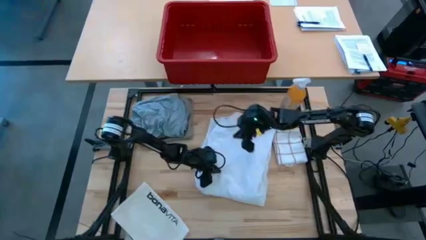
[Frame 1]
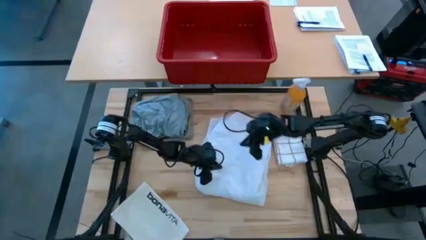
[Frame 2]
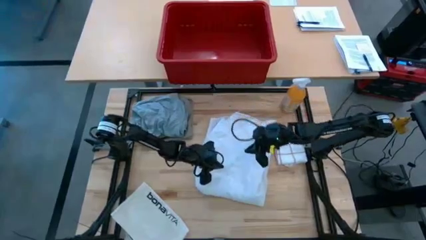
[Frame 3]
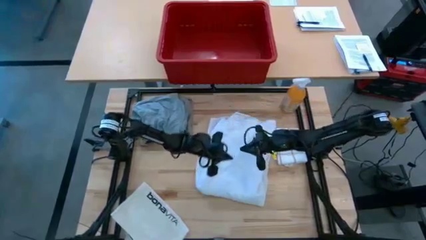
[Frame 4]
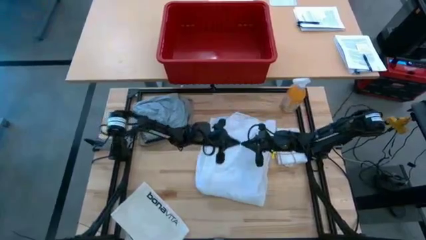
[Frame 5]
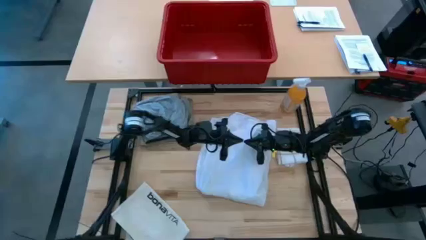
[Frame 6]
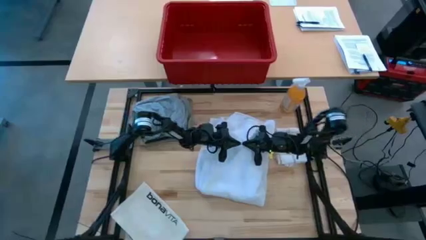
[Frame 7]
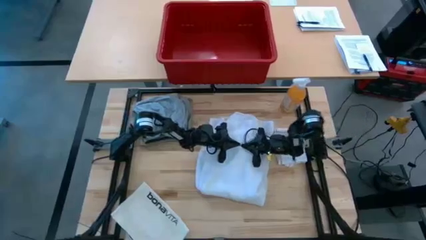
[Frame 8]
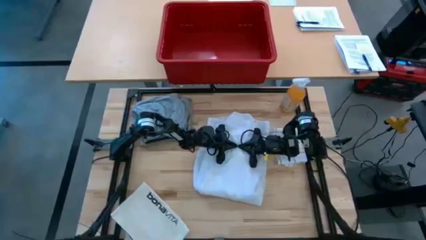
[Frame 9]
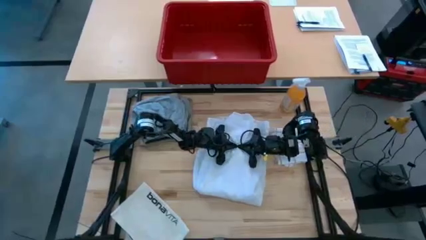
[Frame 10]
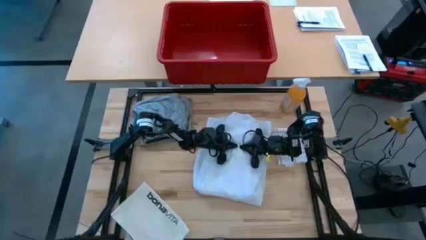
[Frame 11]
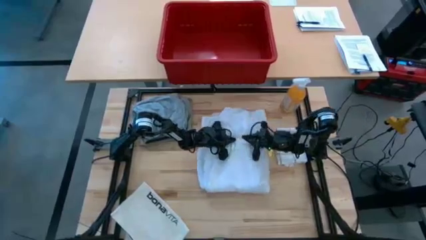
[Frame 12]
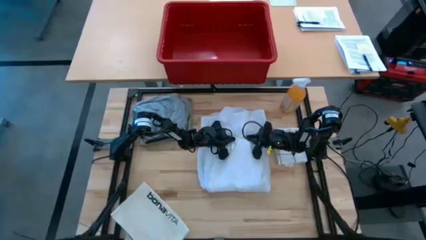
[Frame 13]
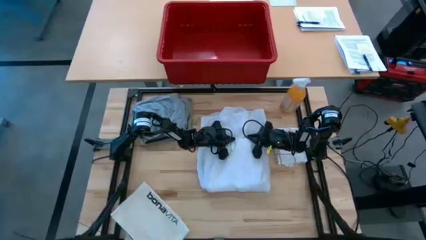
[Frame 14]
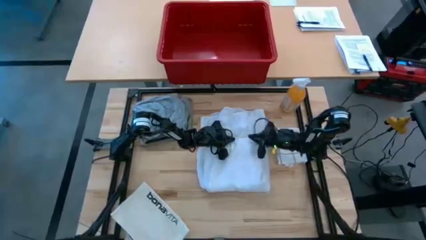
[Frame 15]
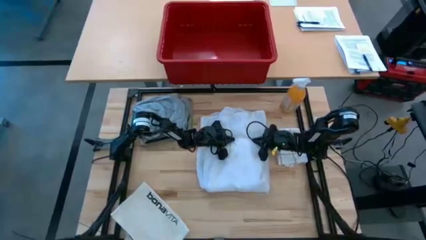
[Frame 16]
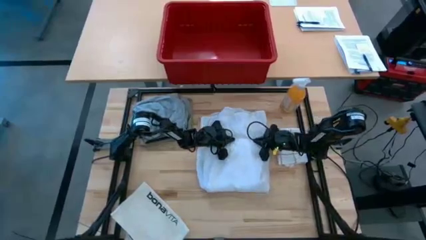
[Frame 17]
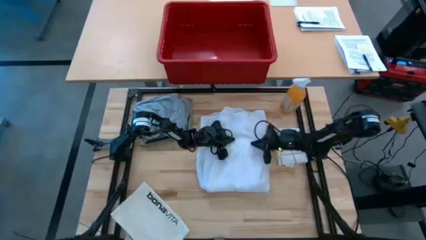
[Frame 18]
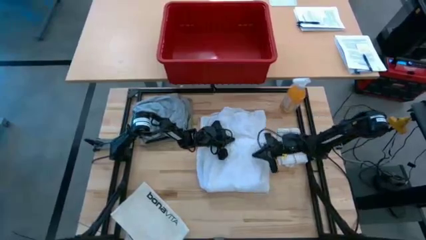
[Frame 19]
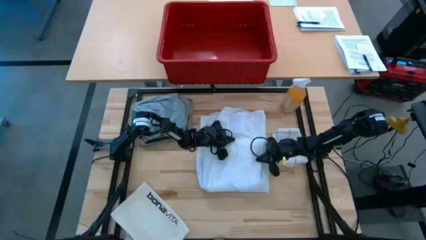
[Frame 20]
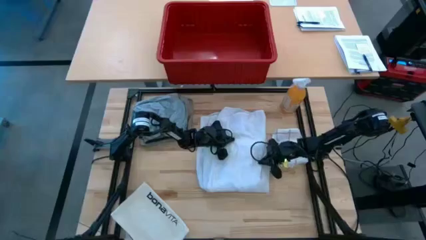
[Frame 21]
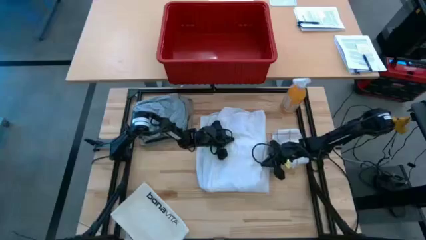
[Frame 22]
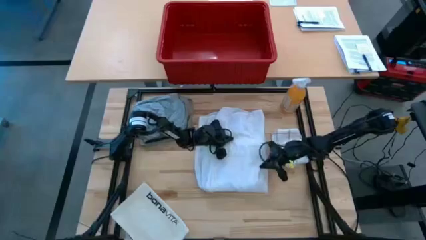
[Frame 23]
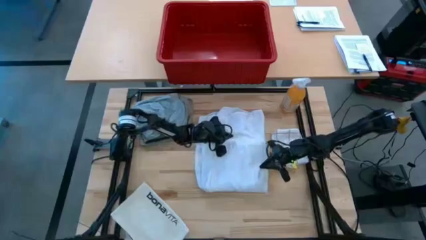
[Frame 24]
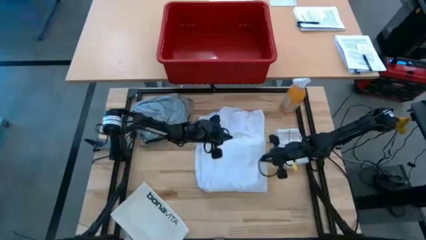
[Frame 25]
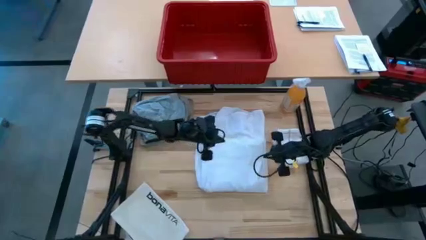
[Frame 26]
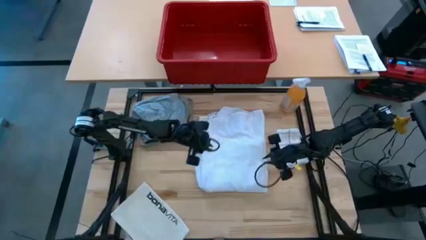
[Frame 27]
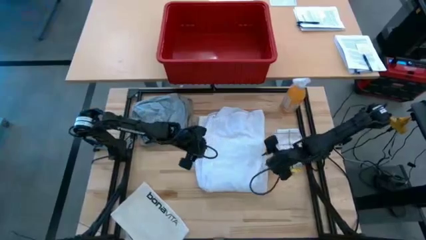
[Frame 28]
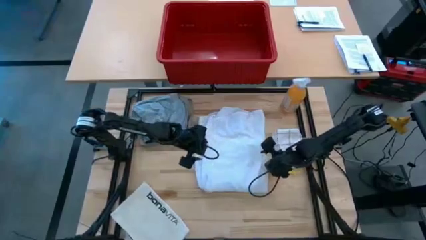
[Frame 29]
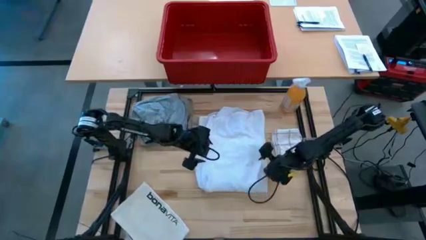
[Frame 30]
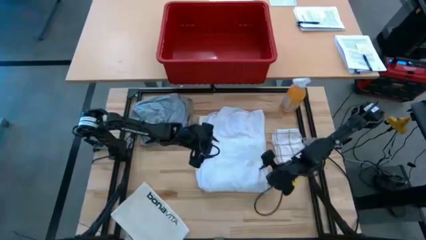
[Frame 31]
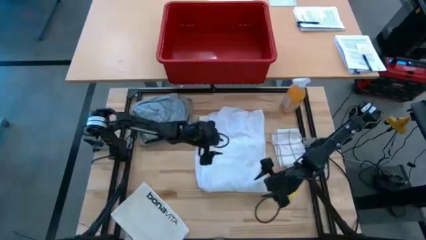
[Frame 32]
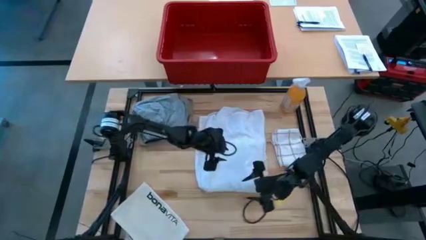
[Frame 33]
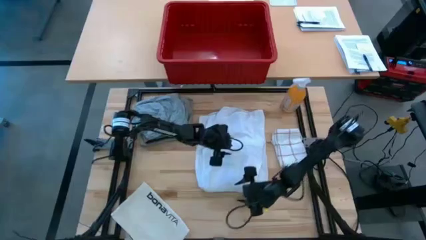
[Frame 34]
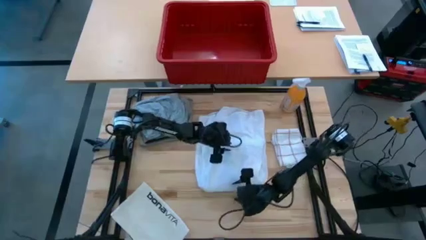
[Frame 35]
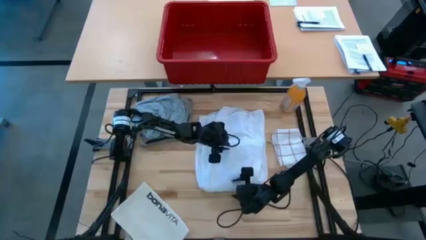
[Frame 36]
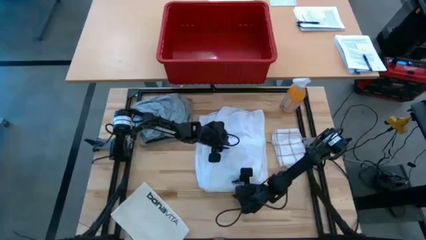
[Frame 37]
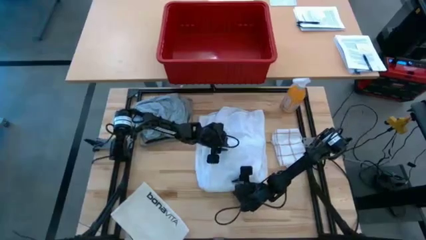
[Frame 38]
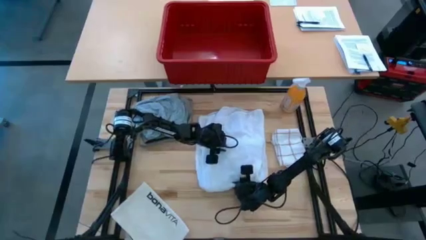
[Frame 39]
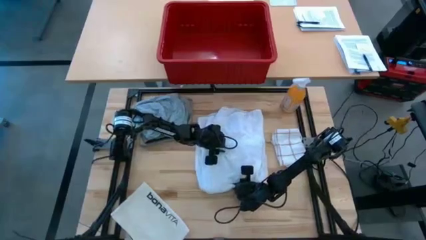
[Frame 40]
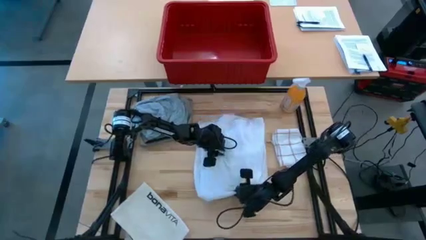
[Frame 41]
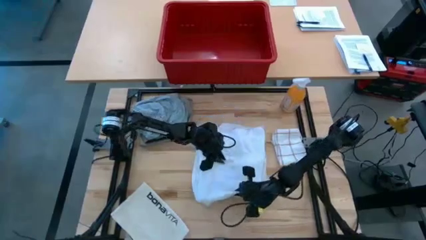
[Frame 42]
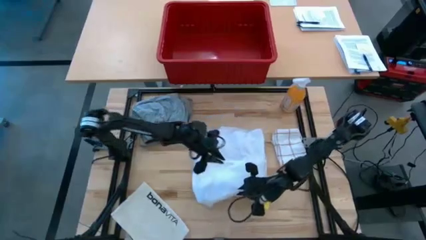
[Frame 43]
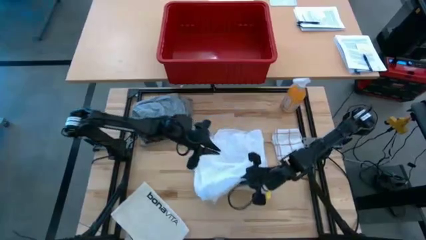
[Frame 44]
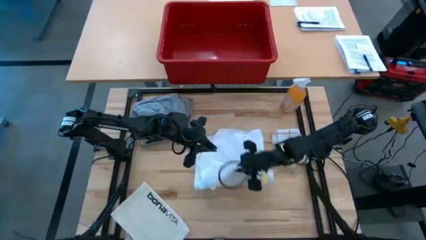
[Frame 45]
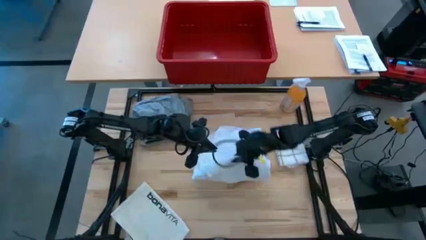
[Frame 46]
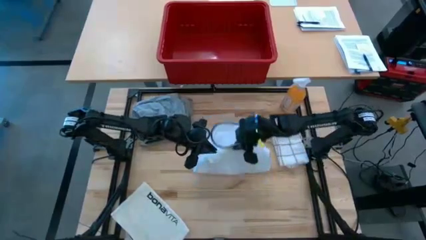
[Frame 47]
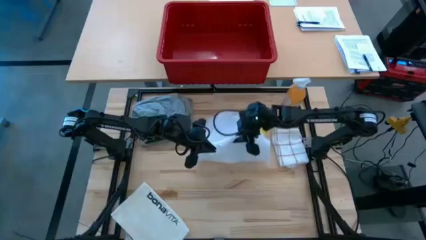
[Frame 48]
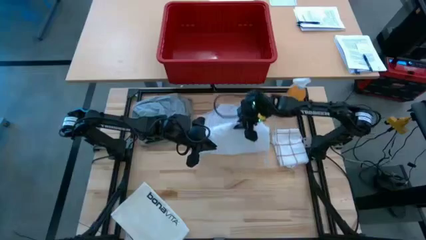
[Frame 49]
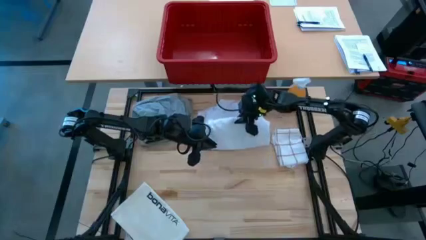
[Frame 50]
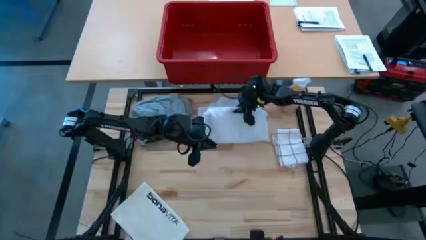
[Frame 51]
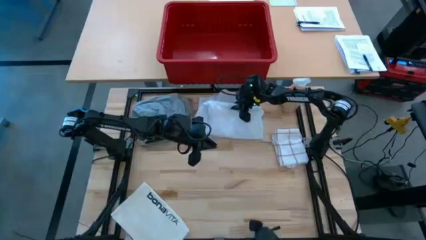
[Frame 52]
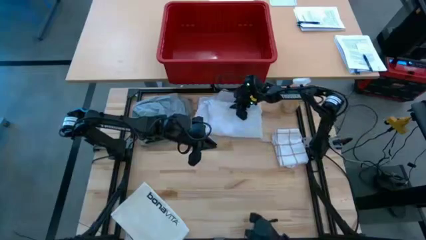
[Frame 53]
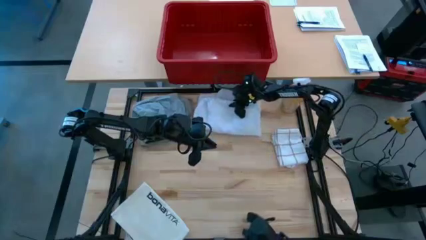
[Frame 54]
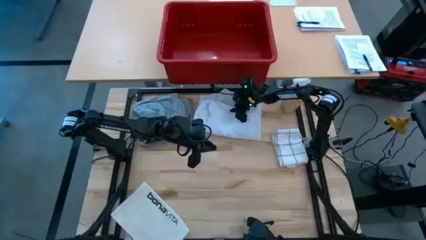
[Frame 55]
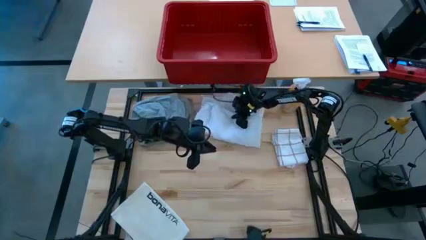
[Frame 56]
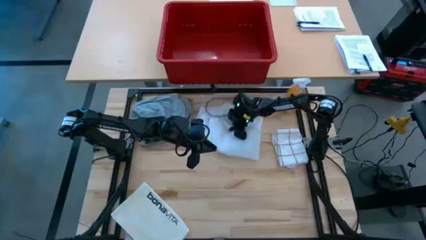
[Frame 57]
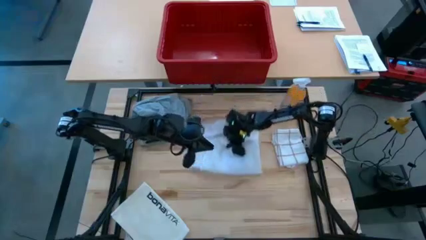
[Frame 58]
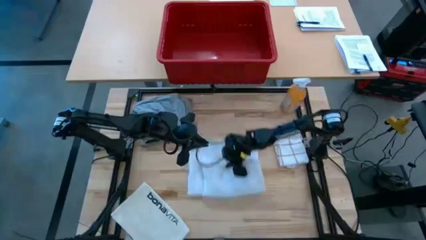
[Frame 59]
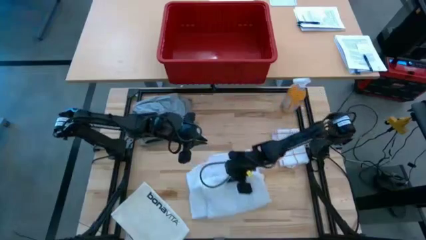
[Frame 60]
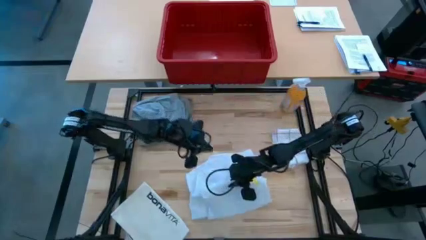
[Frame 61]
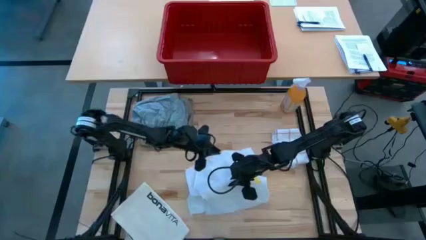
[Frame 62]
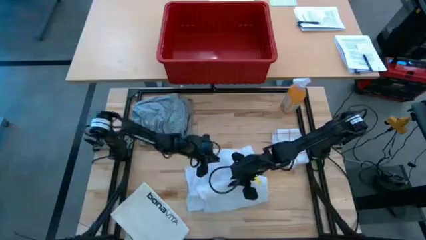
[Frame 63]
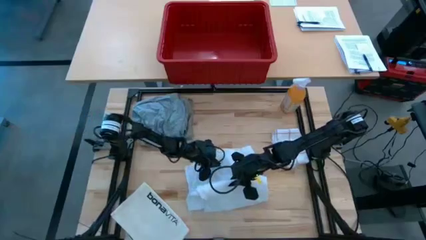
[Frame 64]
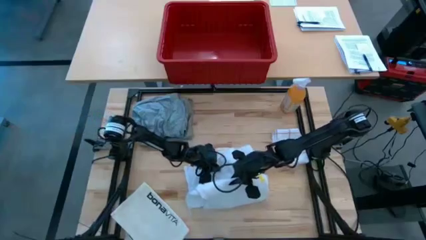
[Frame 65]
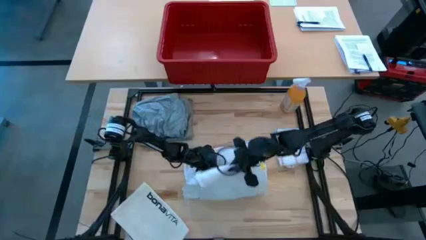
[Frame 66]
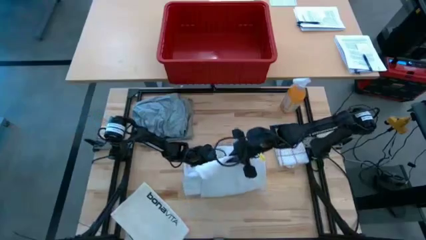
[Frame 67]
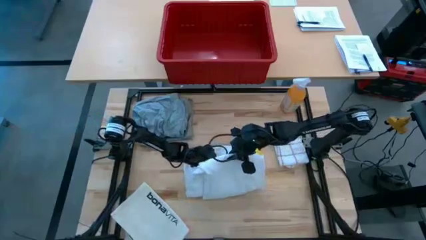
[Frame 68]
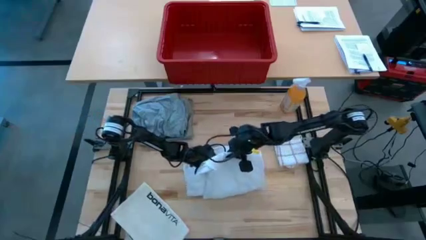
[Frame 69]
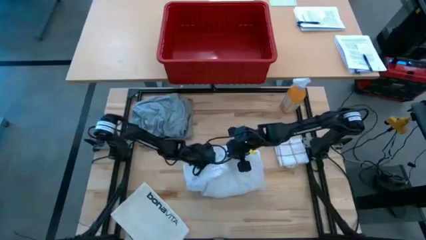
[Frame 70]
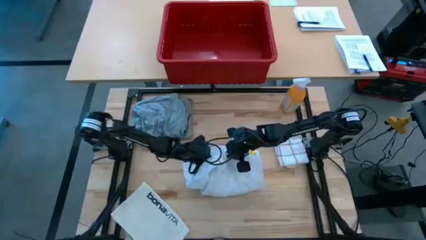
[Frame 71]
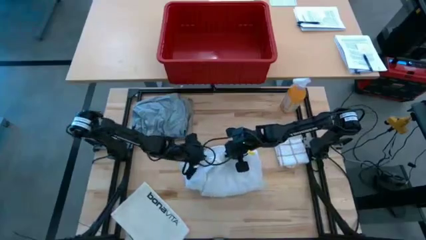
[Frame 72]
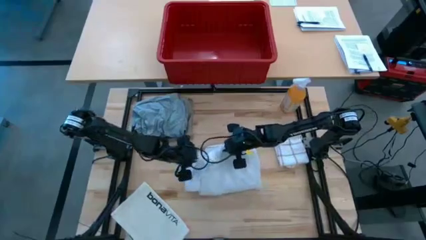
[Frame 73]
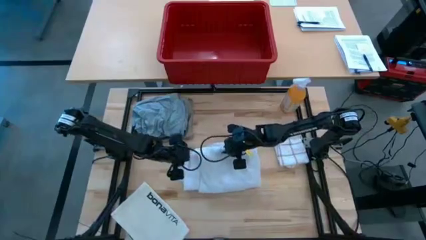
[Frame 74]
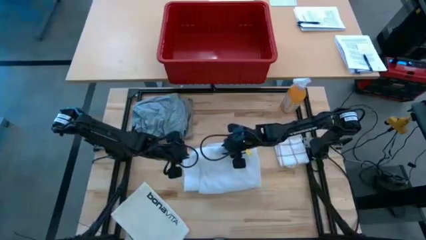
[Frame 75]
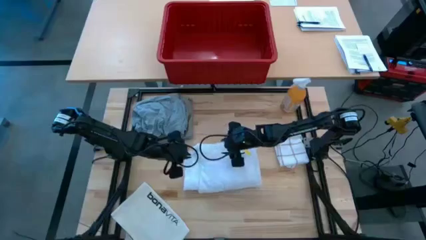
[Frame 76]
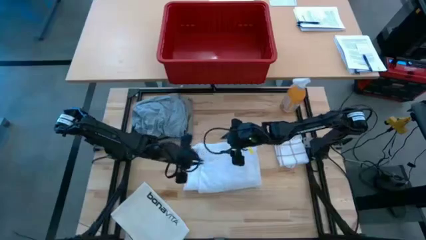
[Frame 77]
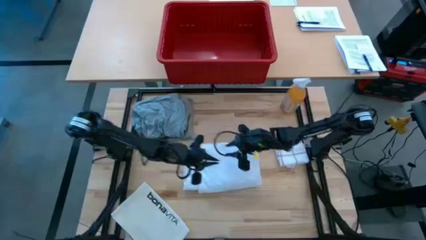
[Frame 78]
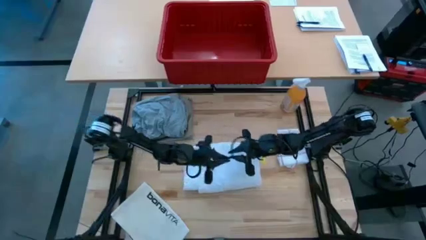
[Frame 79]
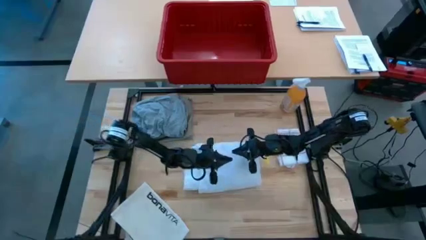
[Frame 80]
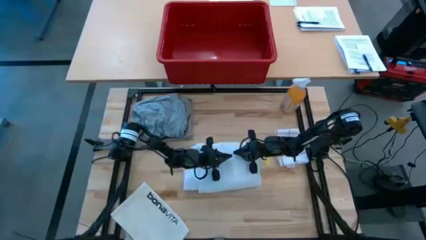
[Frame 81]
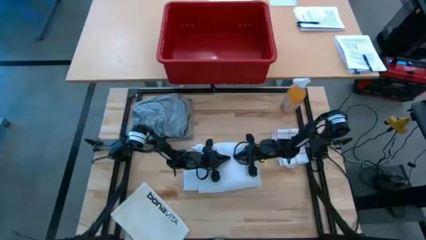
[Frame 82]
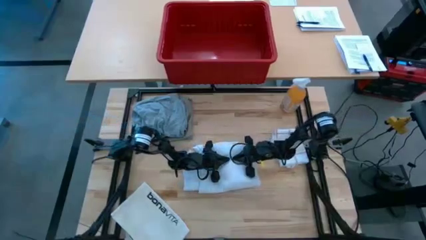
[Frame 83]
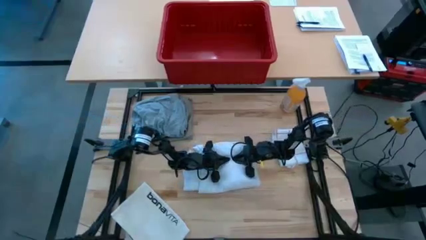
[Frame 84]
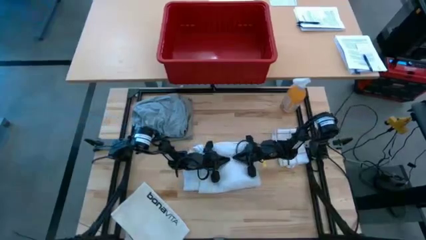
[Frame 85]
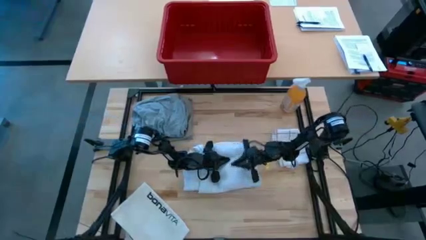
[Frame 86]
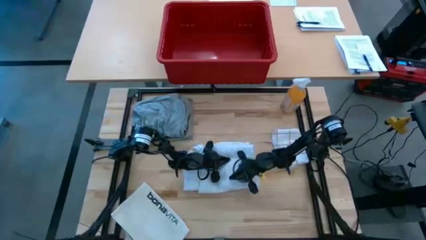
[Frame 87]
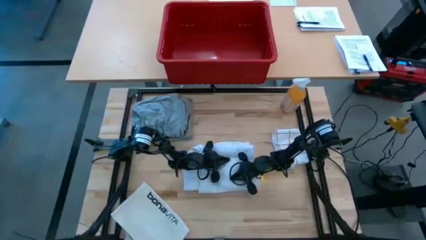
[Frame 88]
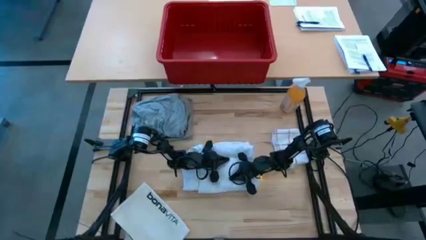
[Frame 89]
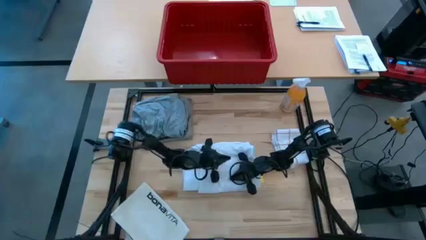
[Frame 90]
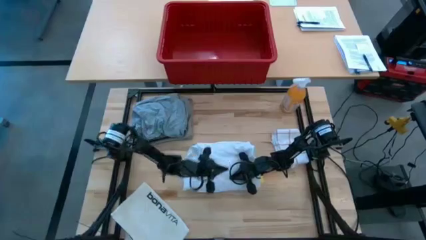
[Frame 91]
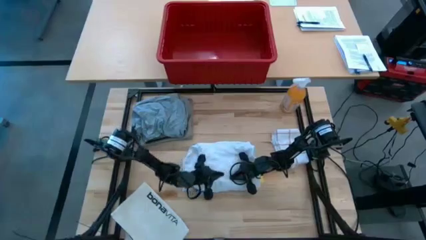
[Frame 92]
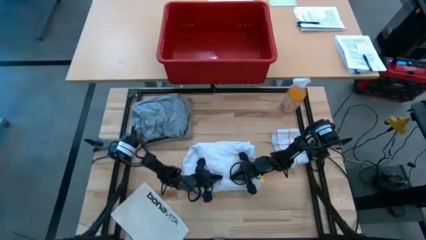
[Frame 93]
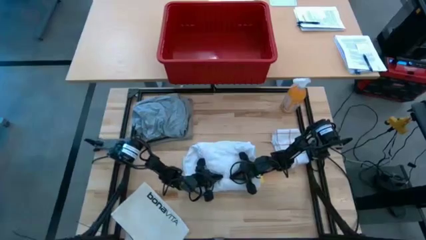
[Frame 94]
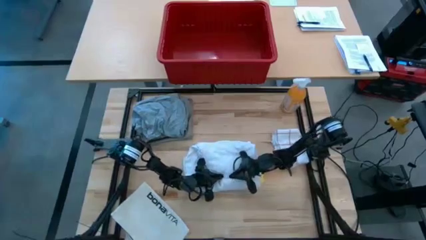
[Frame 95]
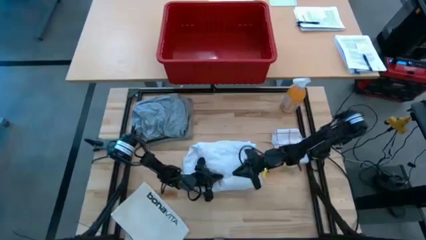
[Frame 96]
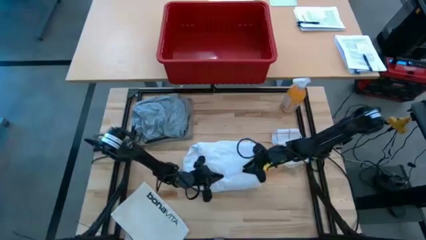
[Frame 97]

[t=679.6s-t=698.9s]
Task: Fold laundry
Fold the white long sleeve shirt
